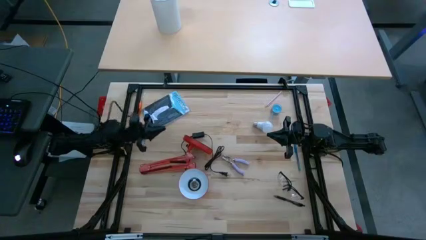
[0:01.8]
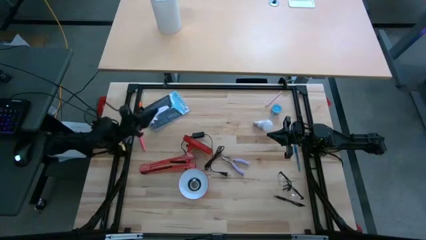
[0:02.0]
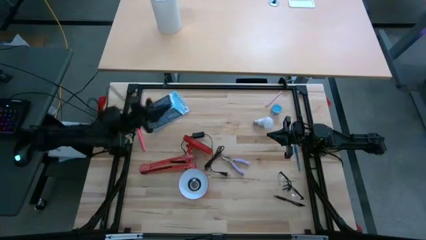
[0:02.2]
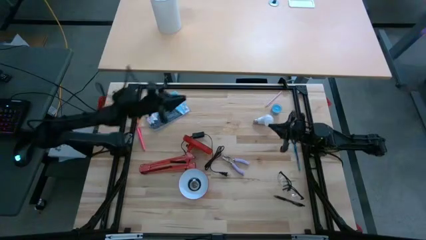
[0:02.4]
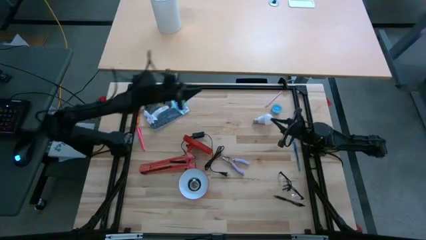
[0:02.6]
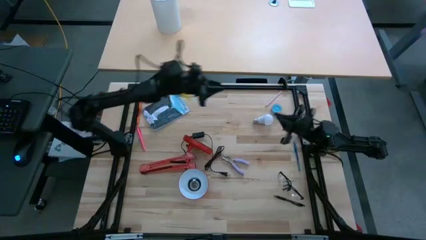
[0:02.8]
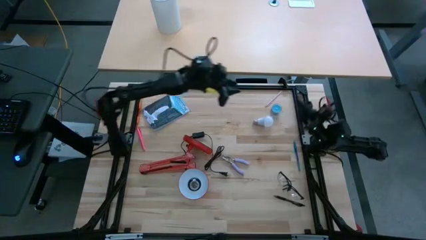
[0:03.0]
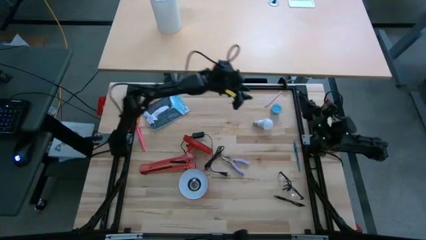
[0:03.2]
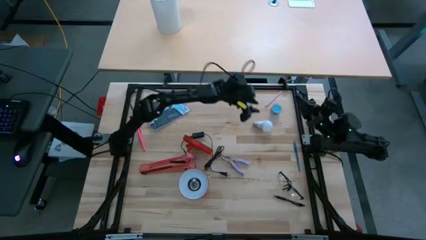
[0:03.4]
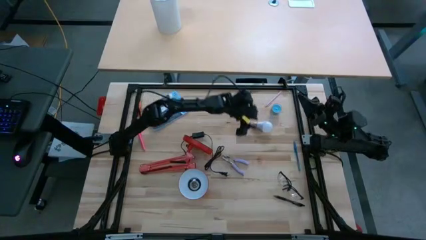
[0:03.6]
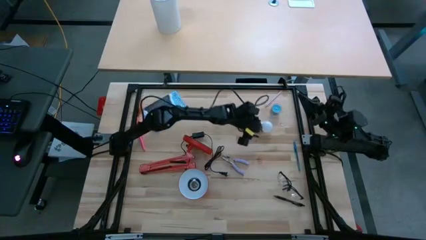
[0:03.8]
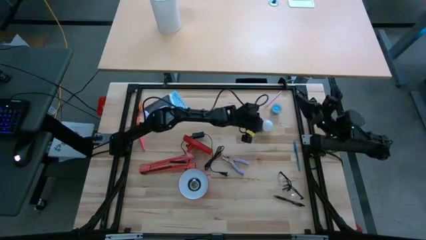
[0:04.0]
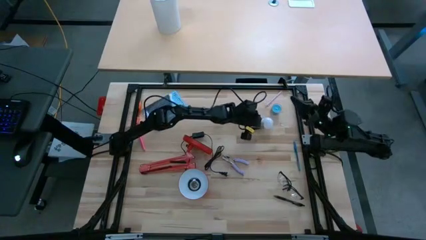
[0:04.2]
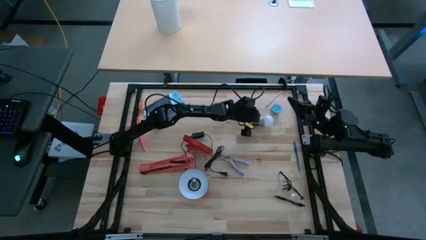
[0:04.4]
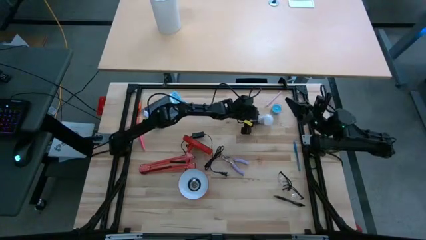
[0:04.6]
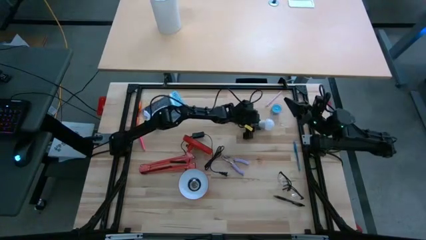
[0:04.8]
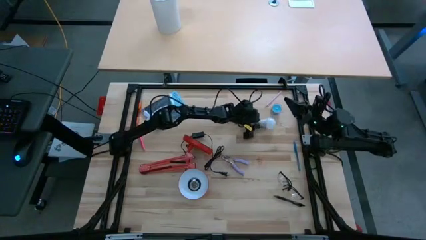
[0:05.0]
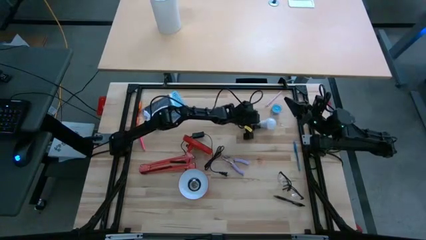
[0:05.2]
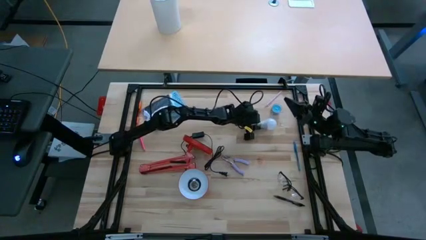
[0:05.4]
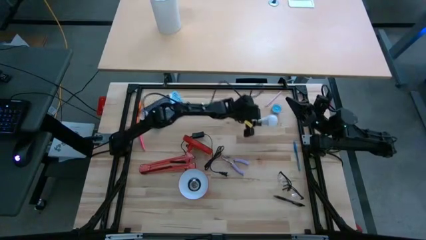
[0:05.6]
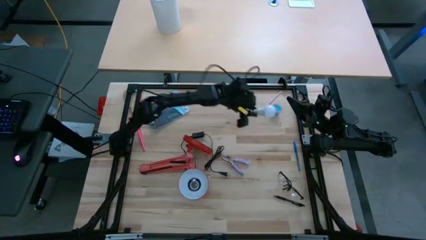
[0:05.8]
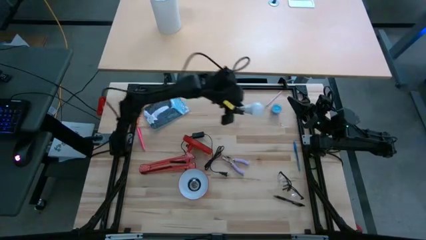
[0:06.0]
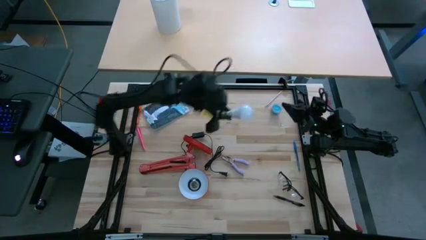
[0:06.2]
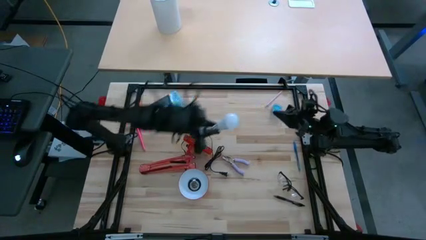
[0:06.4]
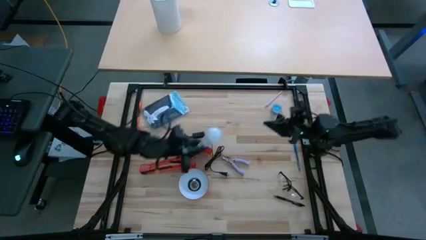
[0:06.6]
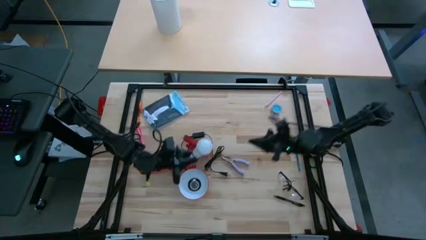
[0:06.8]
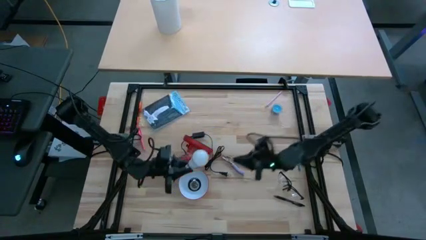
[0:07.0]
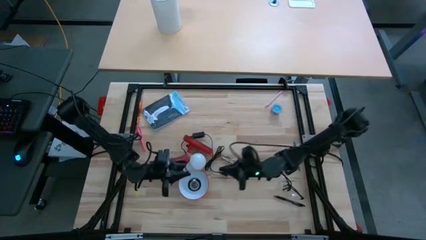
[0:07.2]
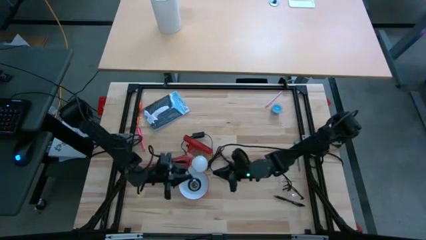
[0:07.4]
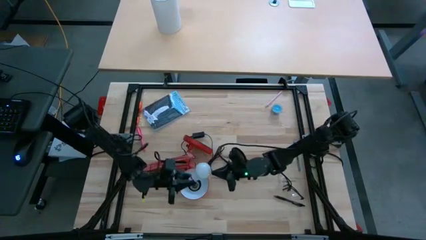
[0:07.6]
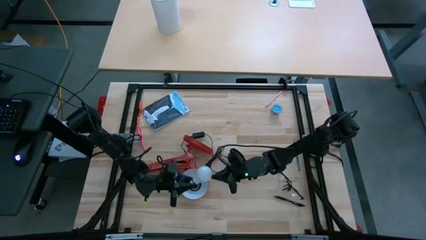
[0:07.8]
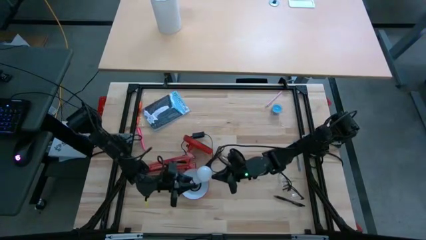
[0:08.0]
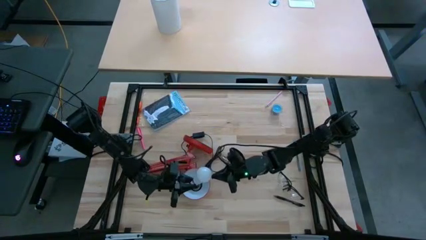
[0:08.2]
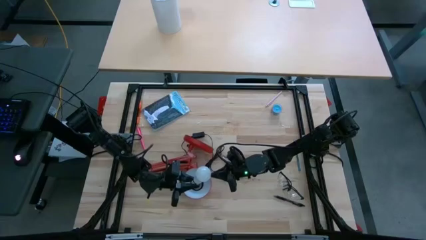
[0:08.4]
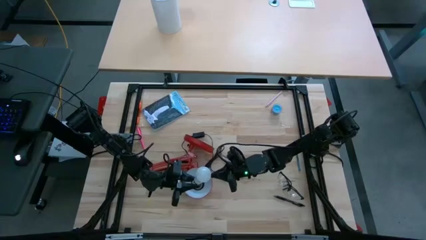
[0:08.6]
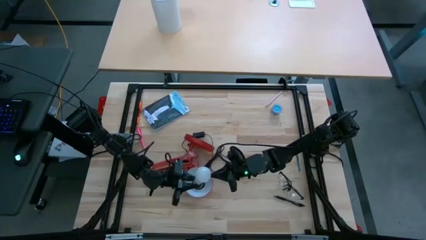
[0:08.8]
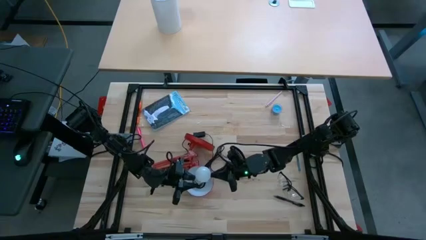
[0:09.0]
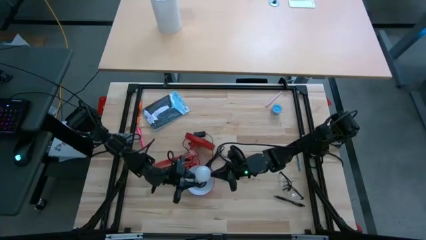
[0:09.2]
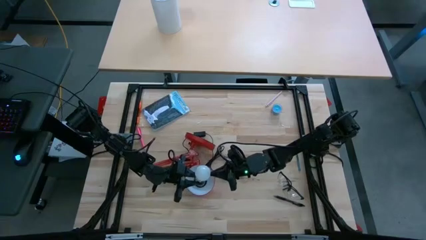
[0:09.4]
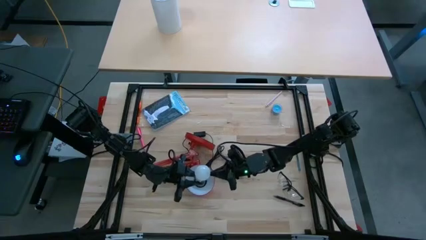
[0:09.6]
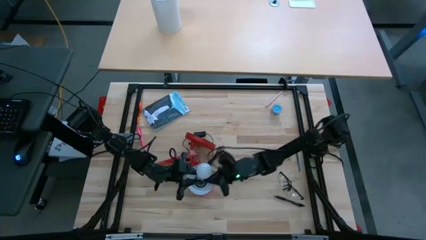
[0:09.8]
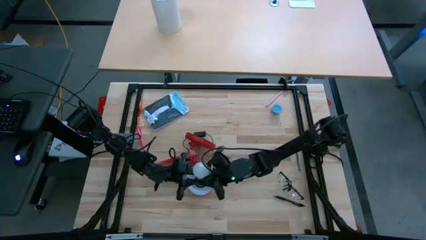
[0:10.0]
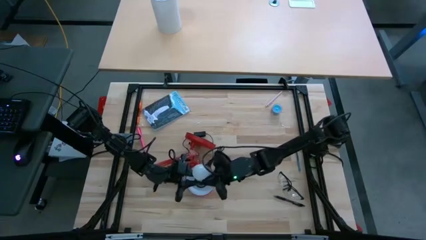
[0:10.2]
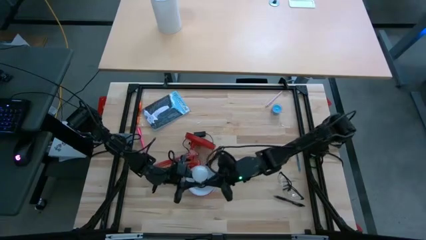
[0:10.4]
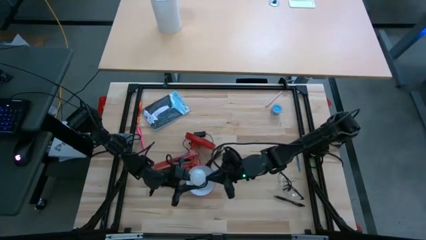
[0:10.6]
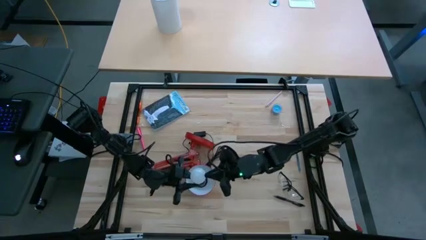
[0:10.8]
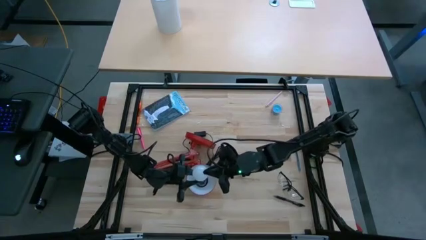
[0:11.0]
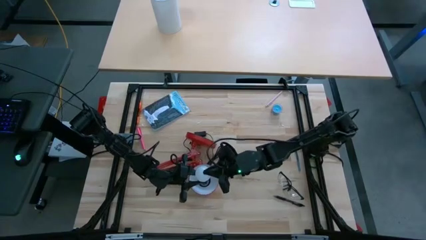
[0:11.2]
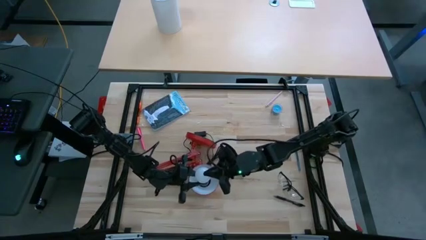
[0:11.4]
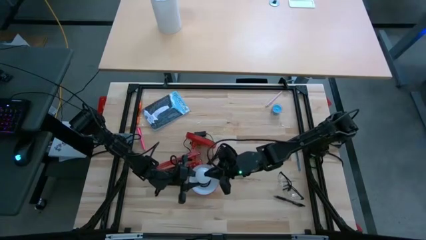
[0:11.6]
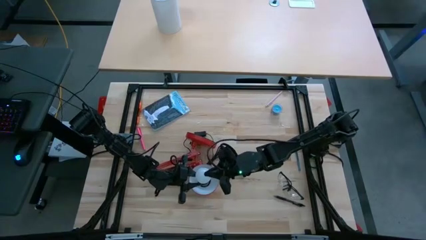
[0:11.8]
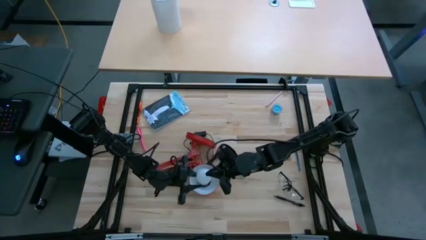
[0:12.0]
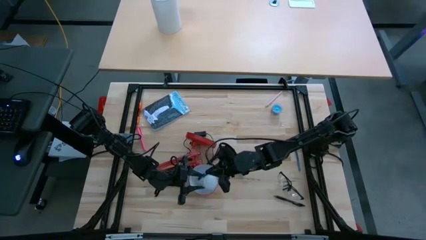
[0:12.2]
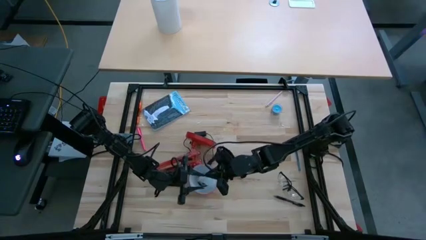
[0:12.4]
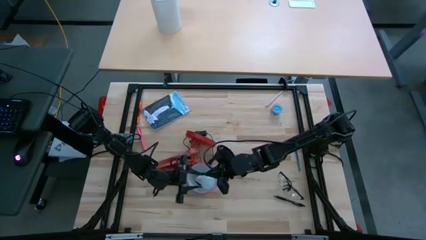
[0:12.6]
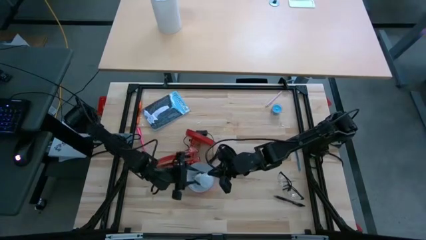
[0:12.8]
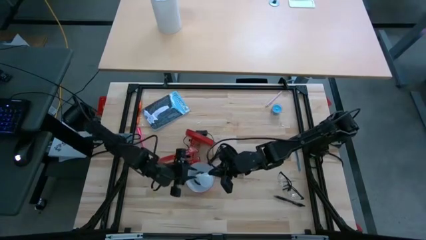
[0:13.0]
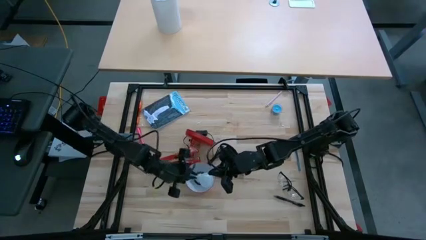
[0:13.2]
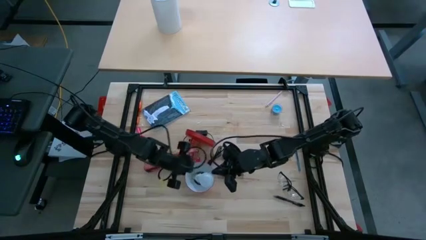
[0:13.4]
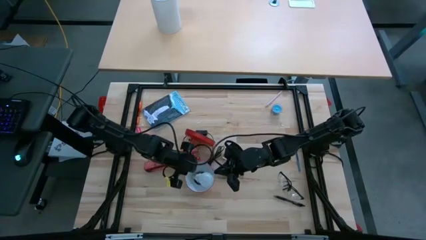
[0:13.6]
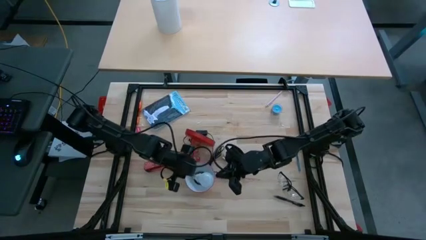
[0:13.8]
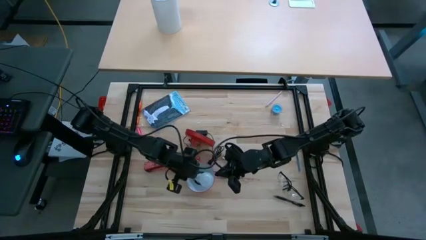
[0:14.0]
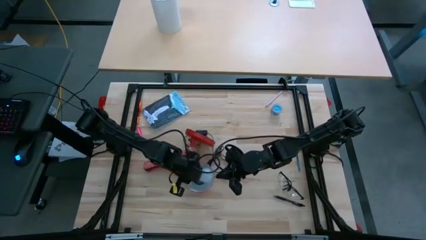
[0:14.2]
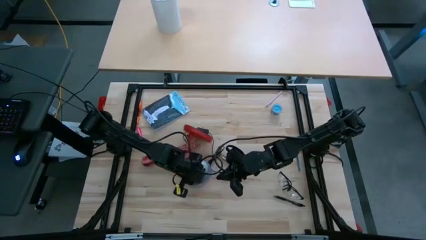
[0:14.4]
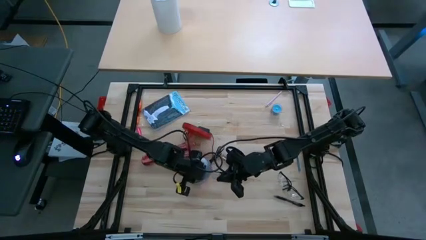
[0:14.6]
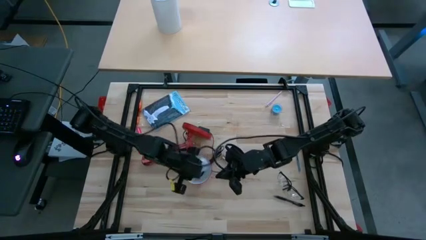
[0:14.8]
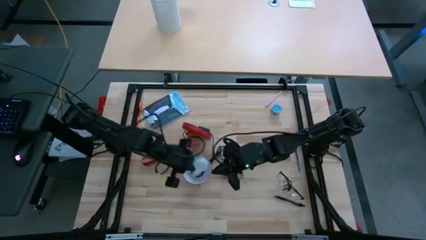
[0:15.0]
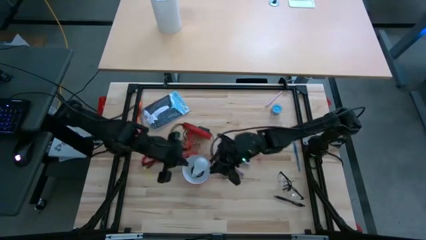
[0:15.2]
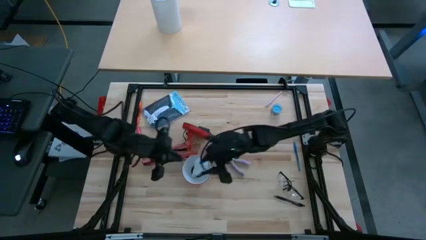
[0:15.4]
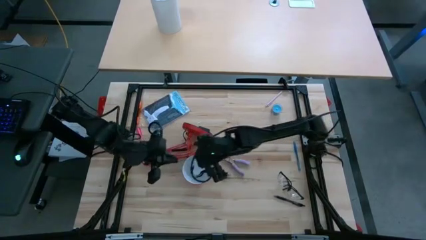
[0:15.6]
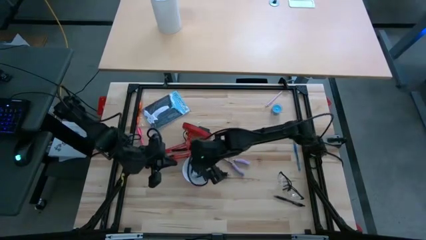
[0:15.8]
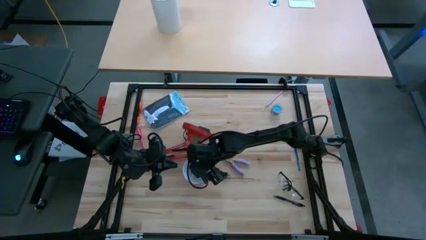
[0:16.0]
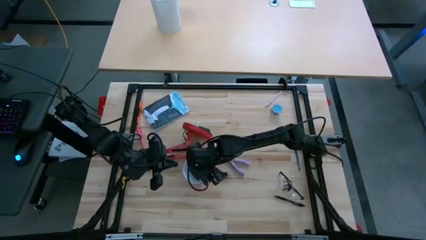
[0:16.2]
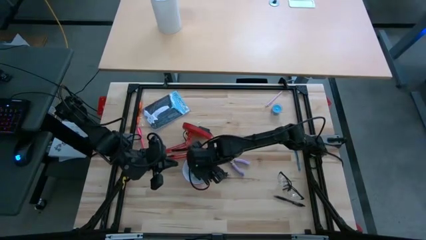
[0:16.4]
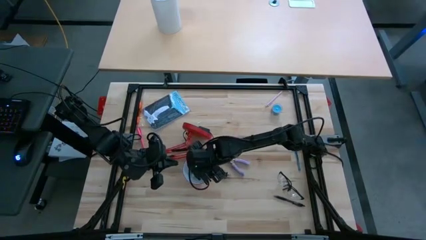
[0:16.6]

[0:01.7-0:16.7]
Task: Screw lightbulb
Insert the lightbulb into the red desk lamp
